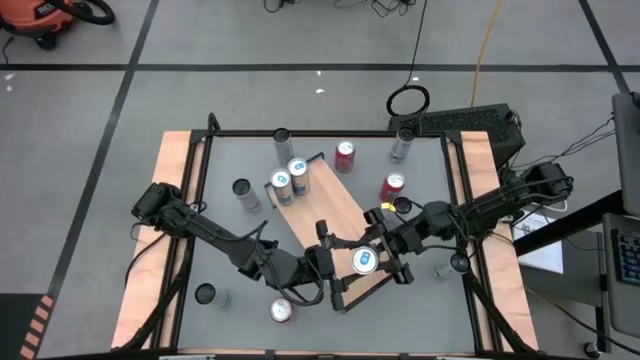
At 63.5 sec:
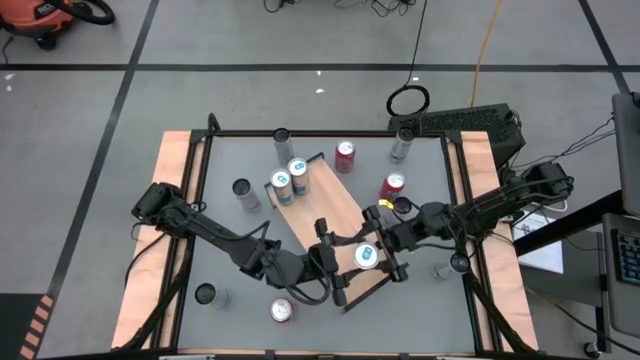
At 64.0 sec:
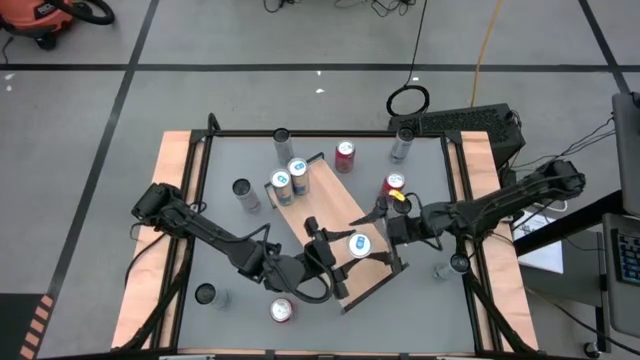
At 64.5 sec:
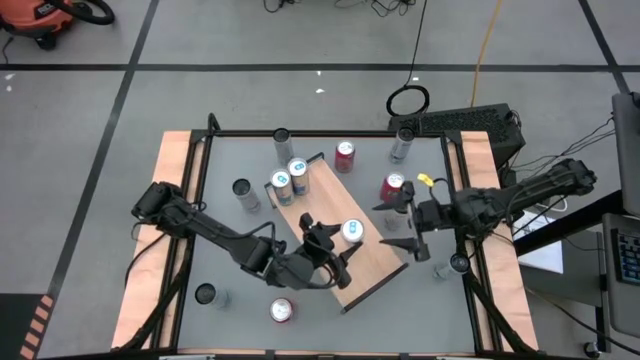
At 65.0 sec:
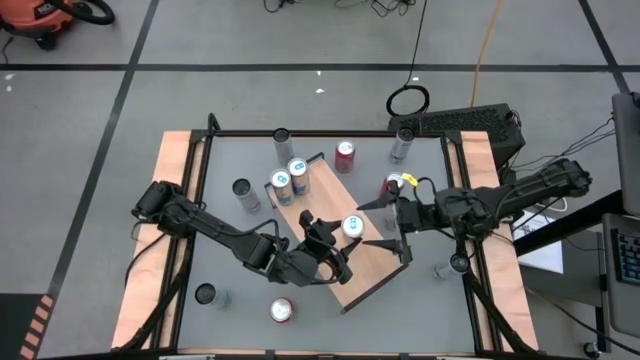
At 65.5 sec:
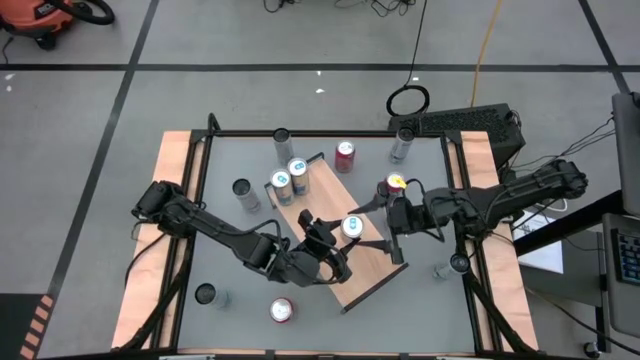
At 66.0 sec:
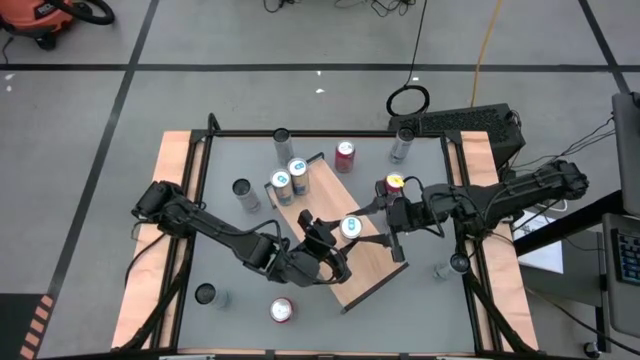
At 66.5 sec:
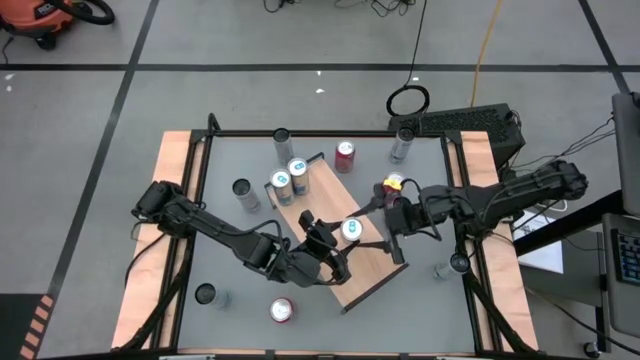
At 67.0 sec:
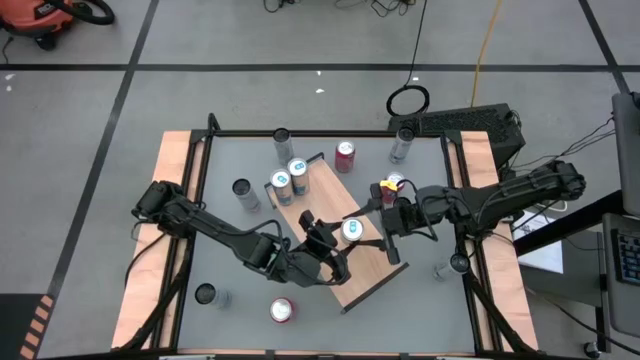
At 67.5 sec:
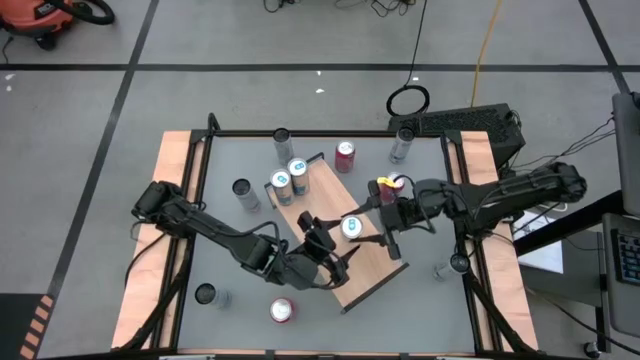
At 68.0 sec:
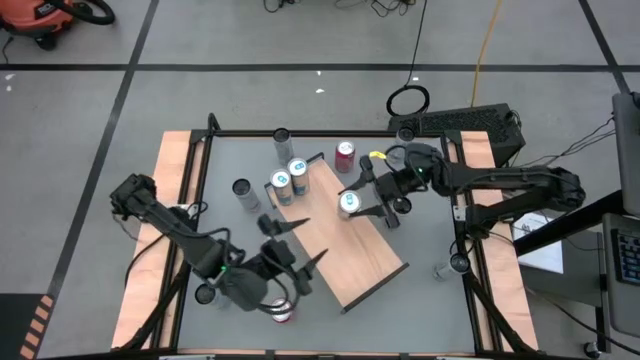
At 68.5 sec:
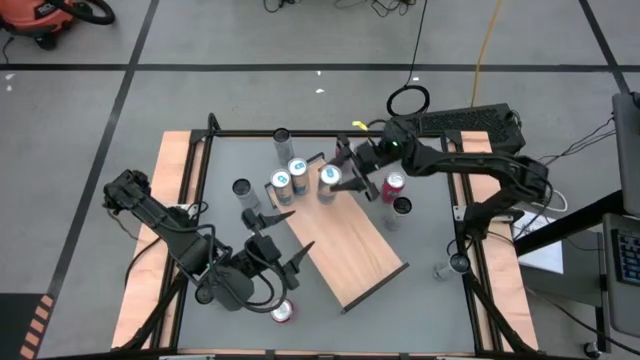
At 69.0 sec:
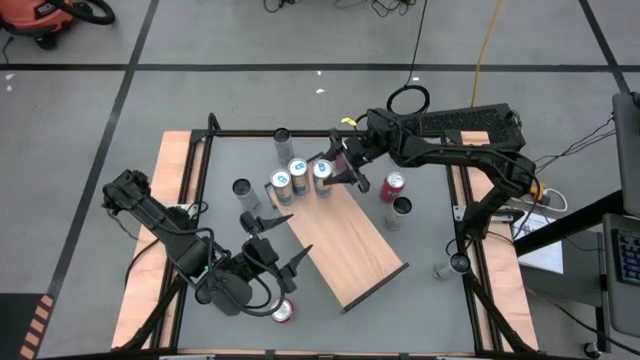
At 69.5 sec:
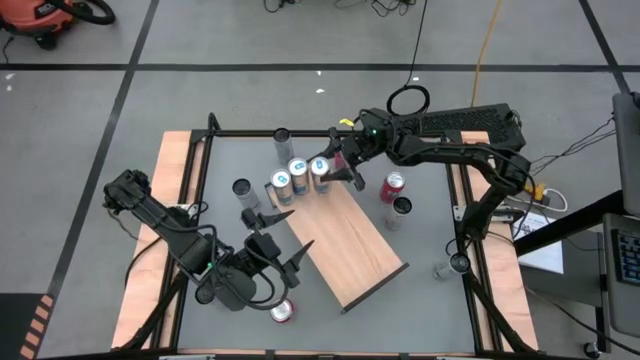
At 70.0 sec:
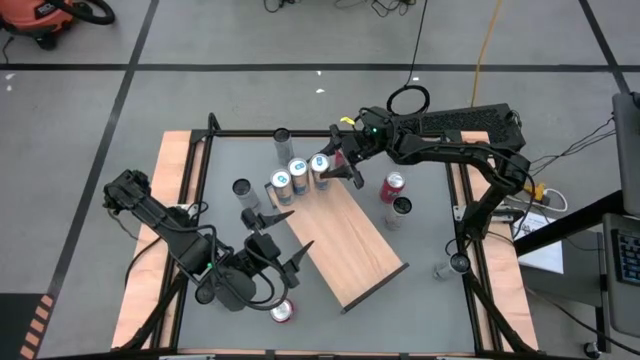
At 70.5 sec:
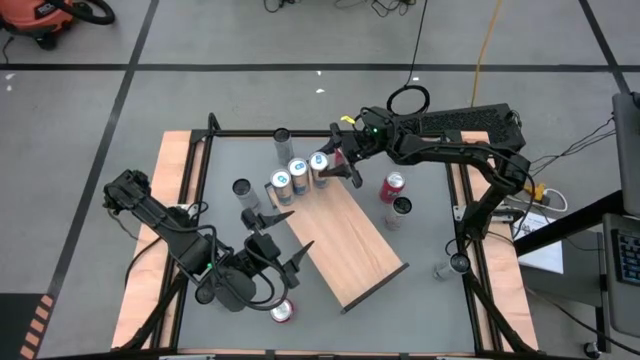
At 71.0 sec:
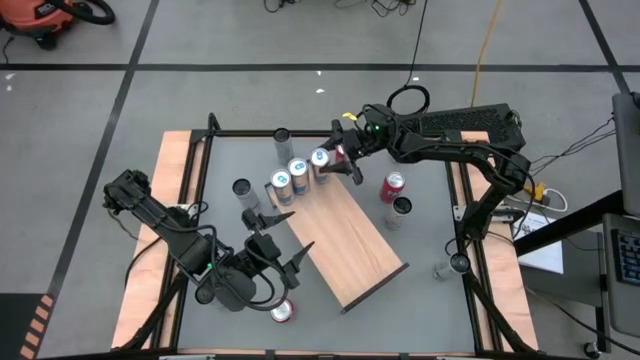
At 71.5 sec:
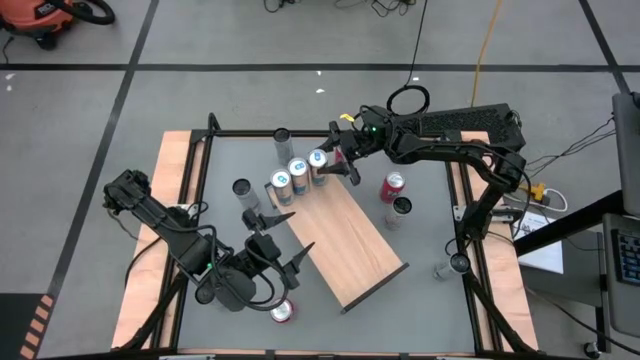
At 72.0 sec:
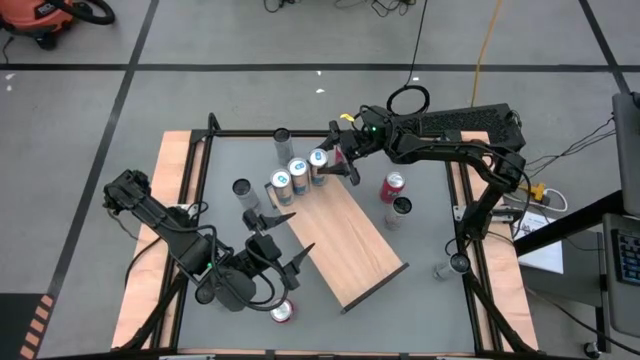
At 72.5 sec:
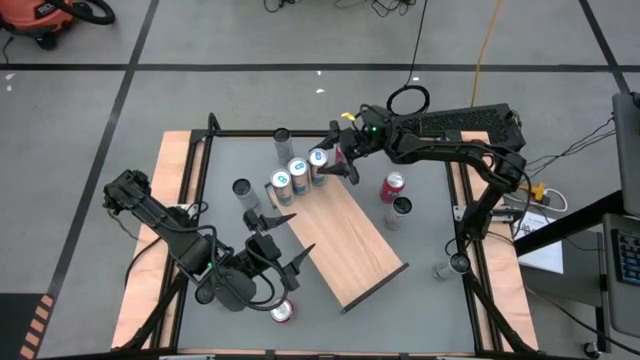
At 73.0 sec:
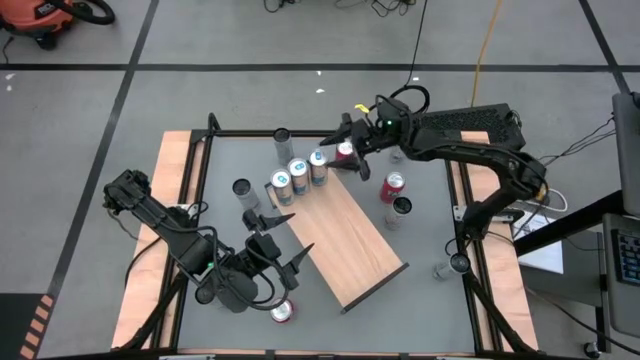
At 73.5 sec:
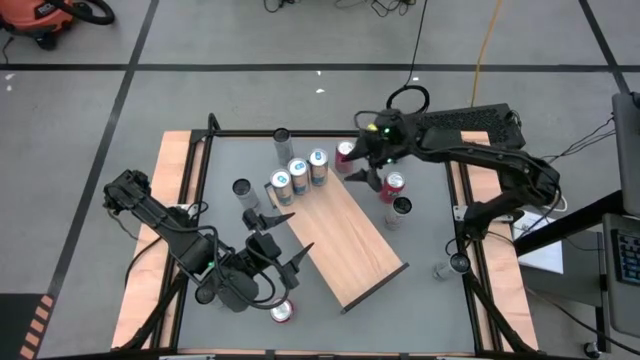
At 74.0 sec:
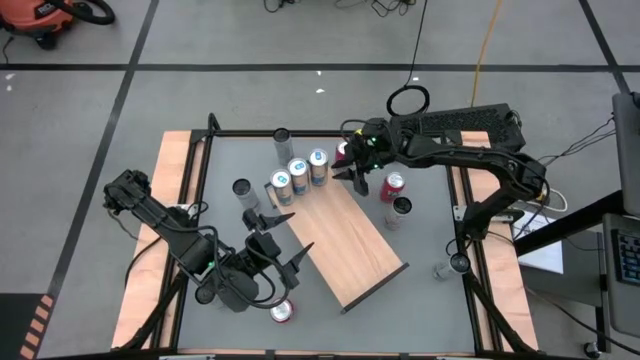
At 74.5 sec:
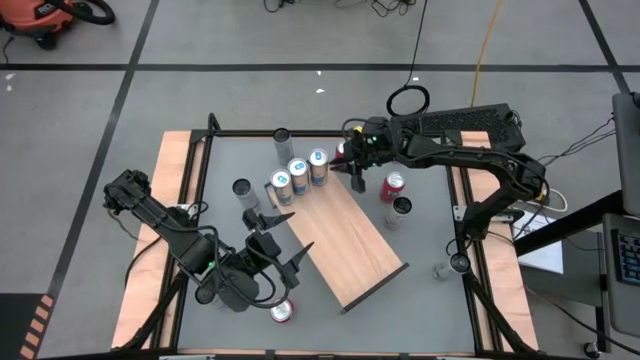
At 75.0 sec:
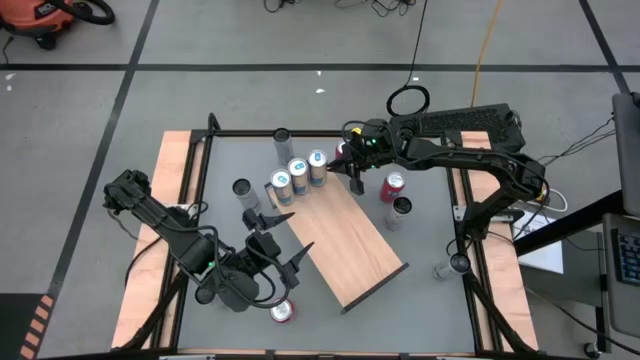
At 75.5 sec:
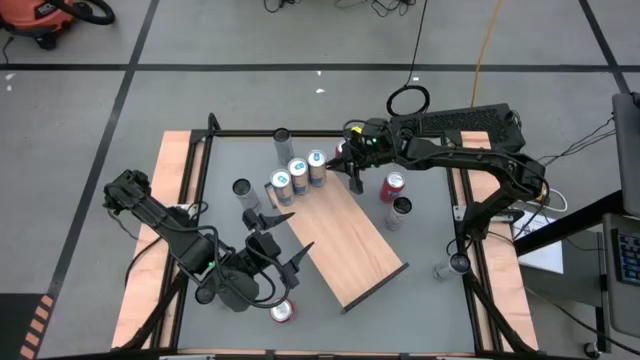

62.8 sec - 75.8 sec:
Task: Place canned beverage on shelf
Put the silver soda can on the shelf aligned with the other silver soda cans

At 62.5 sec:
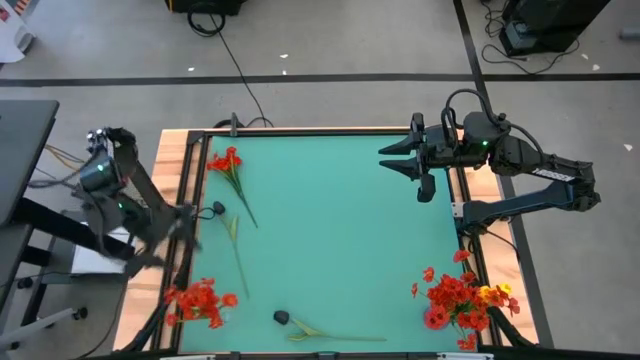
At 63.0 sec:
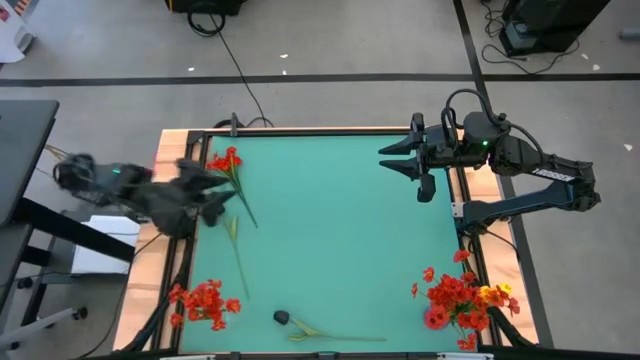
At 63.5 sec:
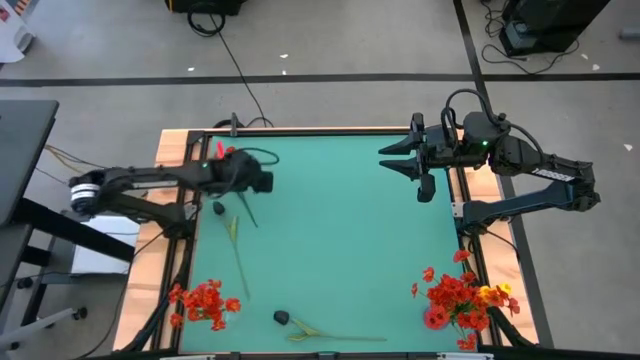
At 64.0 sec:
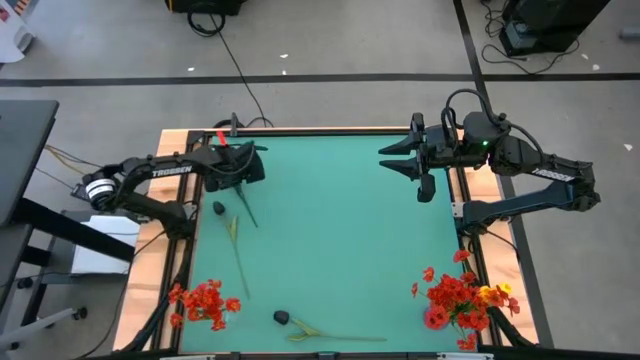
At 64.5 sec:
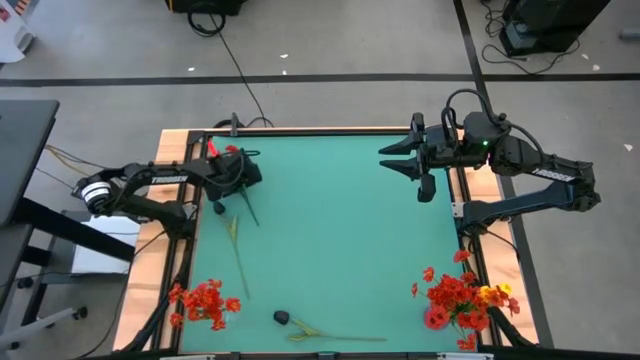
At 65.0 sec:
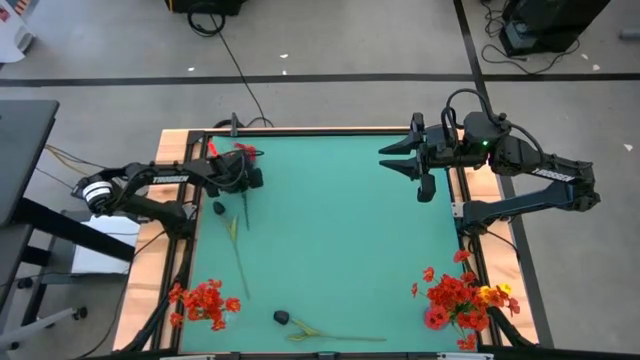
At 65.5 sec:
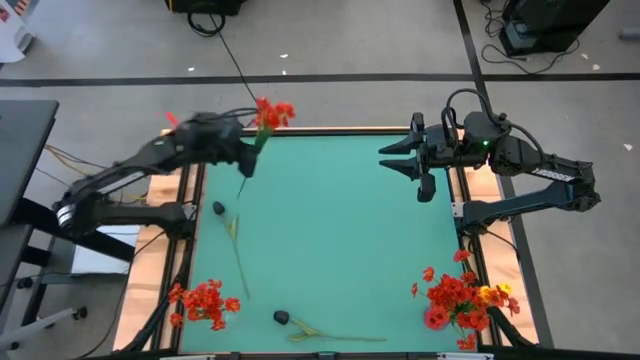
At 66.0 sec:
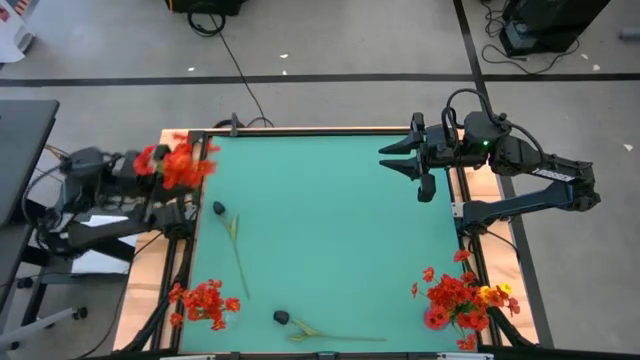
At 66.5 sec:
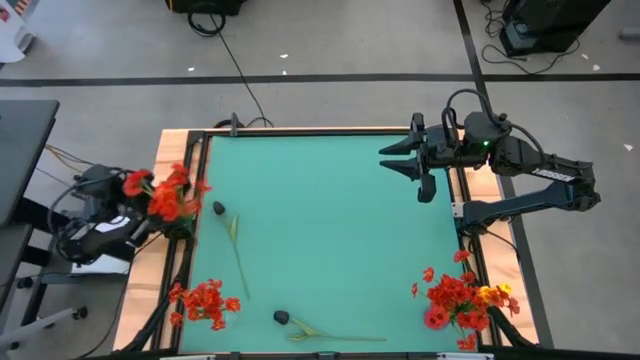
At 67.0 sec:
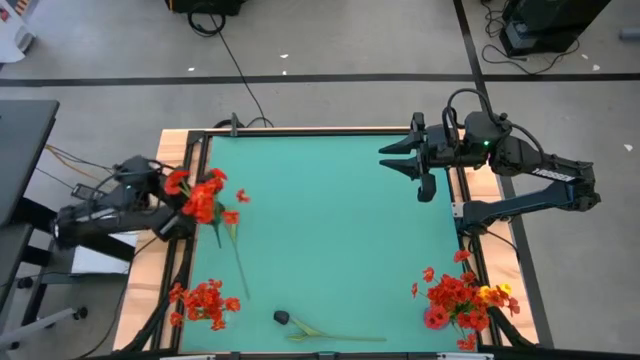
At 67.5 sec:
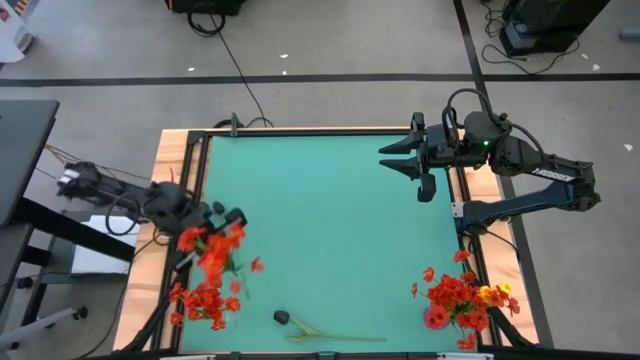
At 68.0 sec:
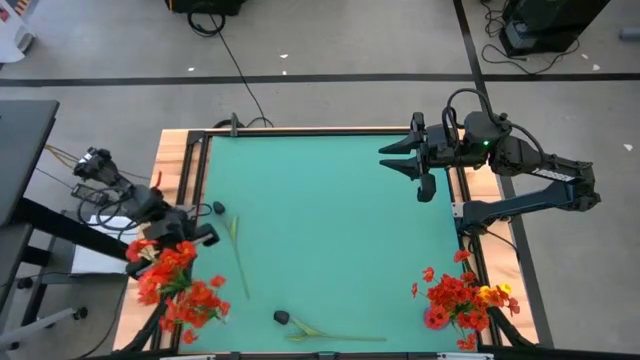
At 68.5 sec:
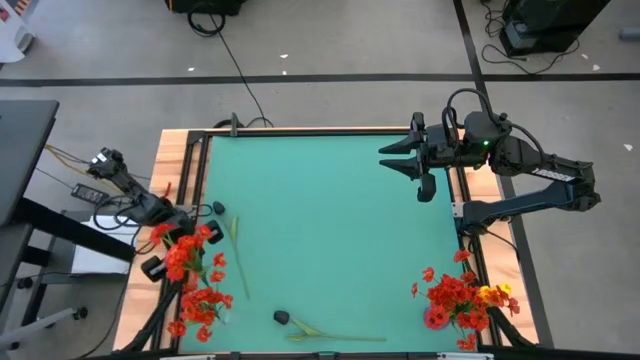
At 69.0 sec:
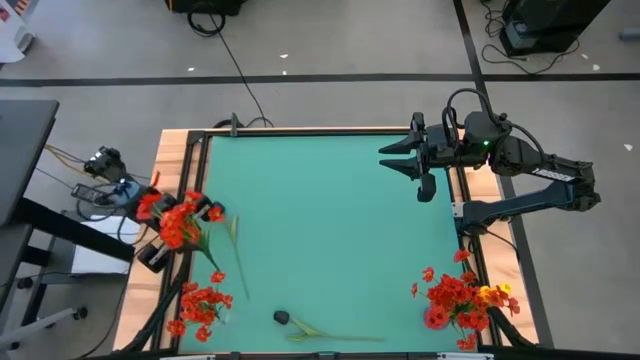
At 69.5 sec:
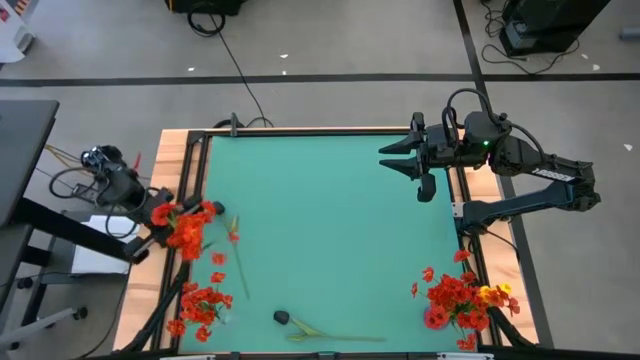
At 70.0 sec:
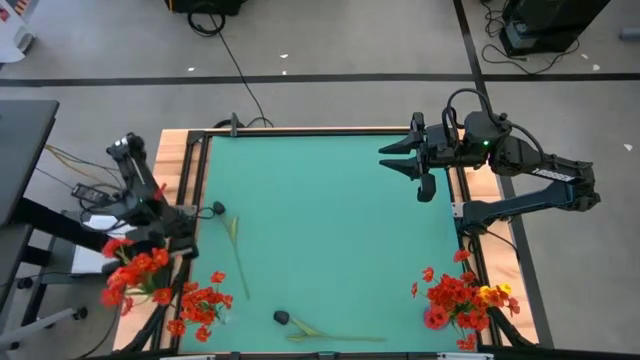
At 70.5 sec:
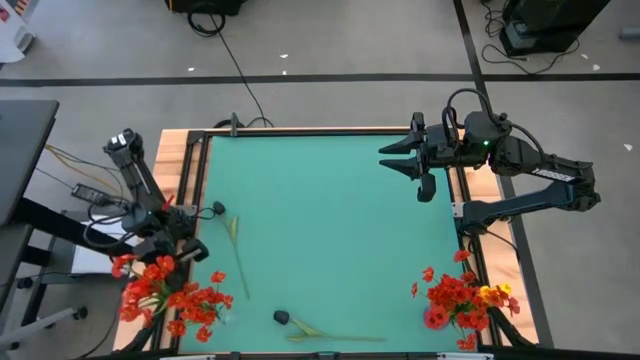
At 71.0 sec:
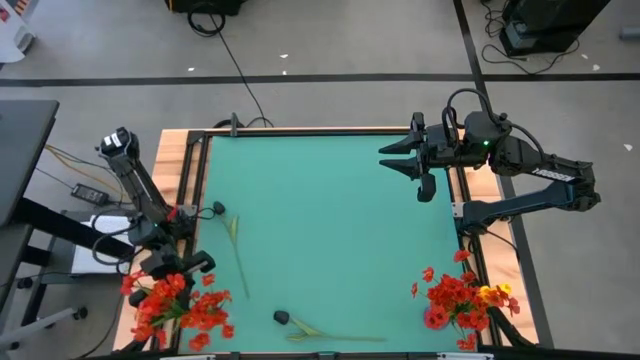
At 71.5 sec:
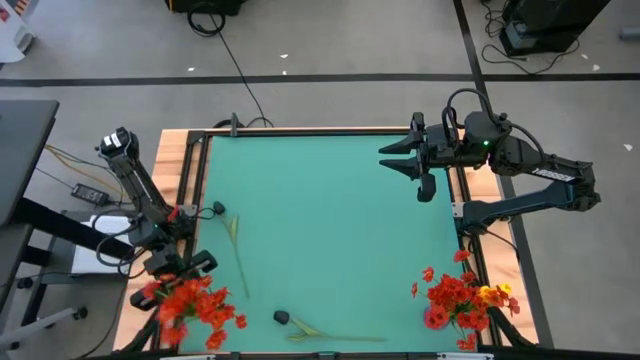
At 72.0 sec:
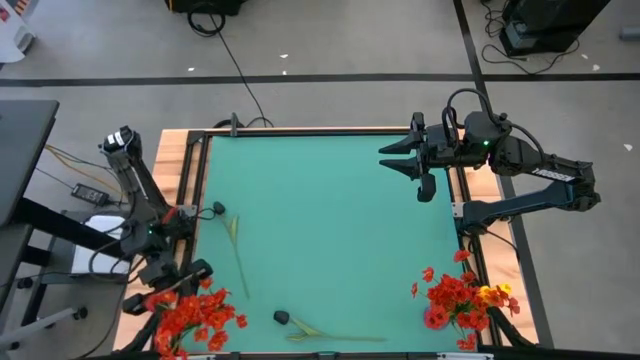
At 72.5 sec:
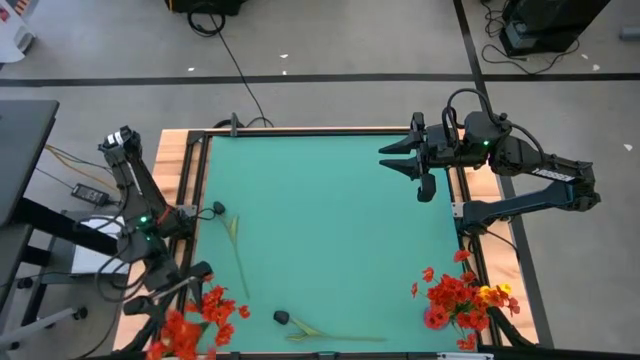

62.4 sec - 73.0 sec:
Task: Sort flowers into vase by color
Put the orange flowers into the transparent vase
